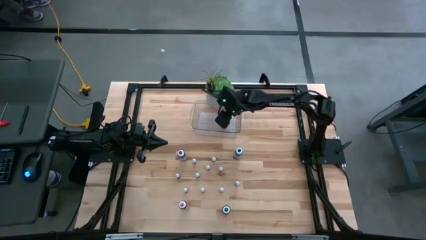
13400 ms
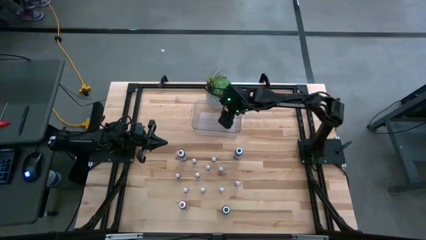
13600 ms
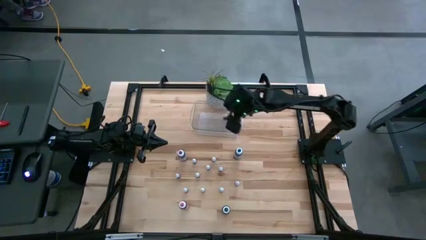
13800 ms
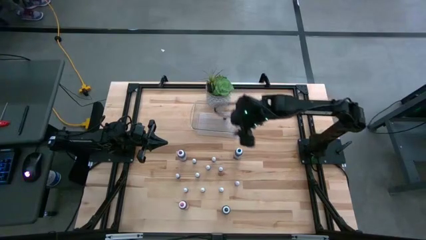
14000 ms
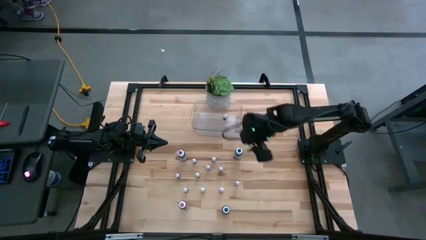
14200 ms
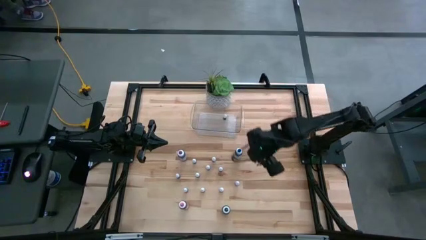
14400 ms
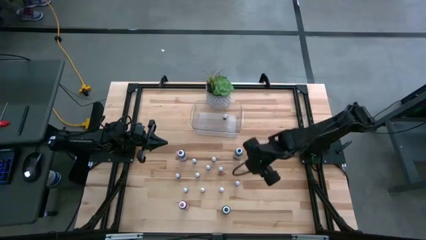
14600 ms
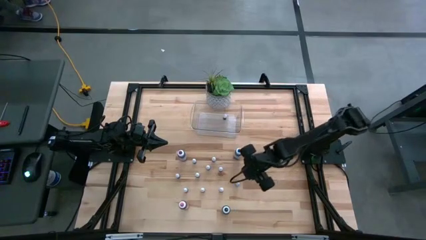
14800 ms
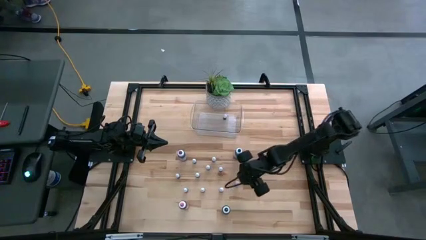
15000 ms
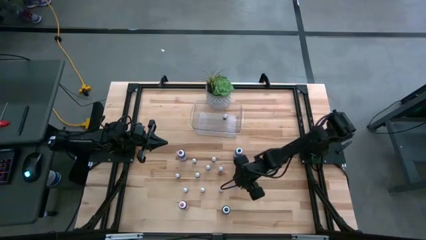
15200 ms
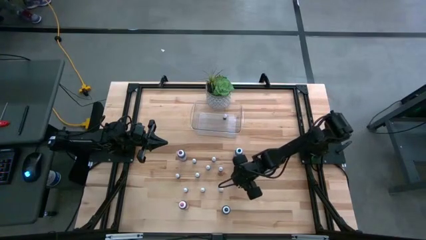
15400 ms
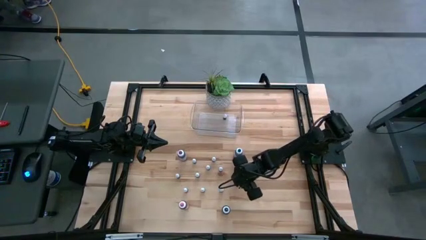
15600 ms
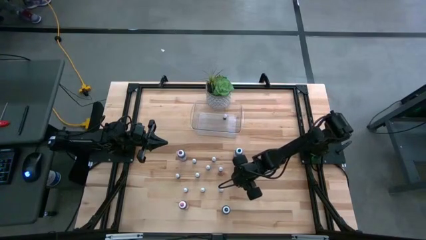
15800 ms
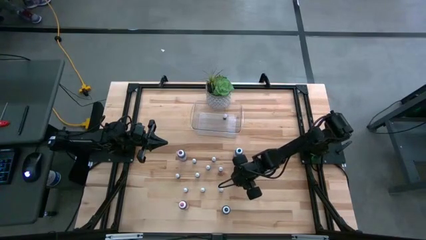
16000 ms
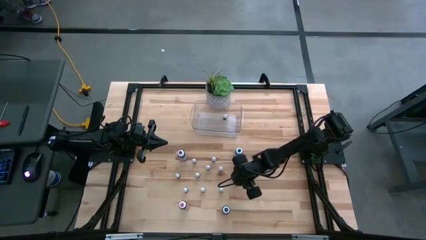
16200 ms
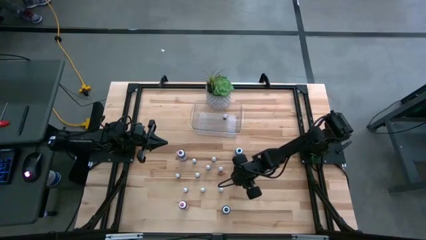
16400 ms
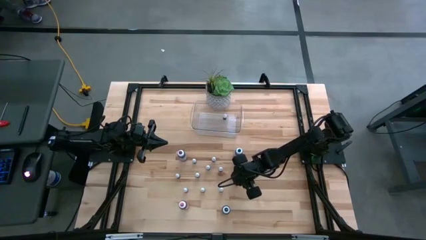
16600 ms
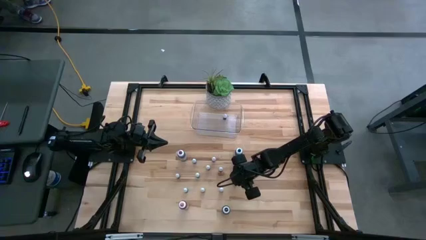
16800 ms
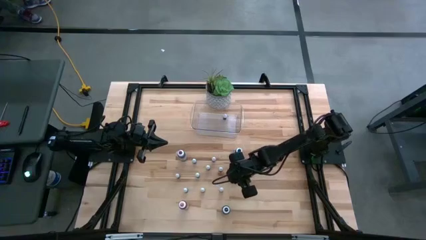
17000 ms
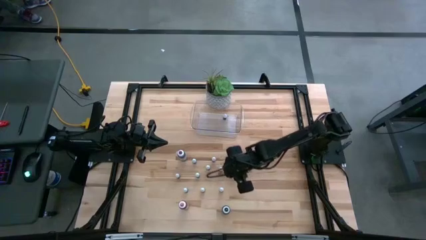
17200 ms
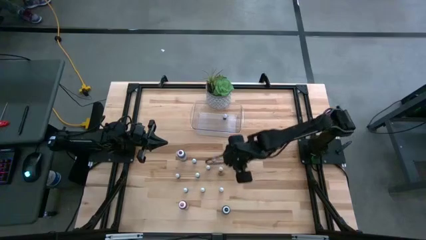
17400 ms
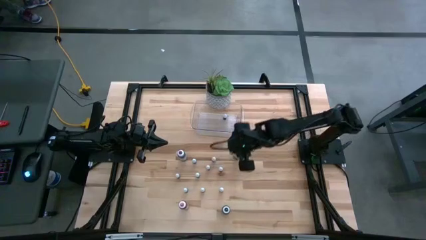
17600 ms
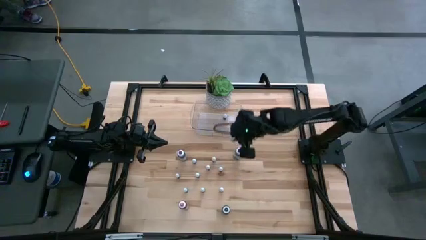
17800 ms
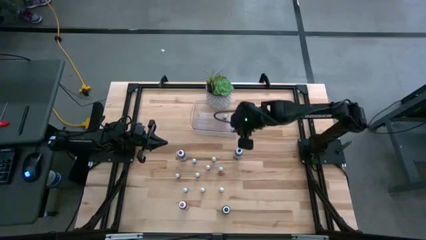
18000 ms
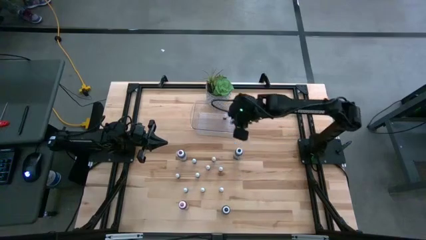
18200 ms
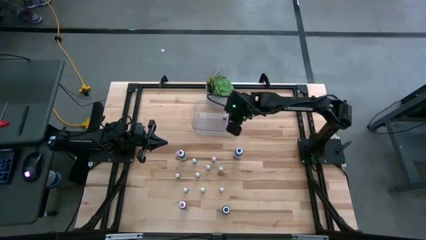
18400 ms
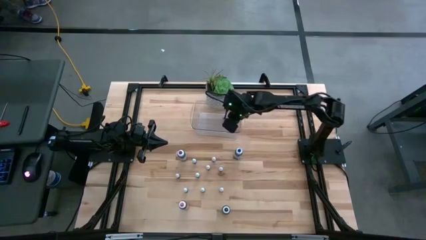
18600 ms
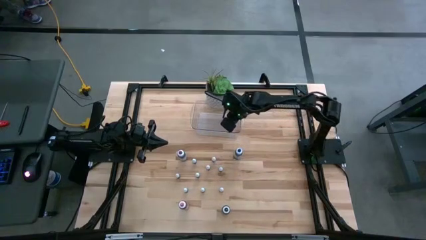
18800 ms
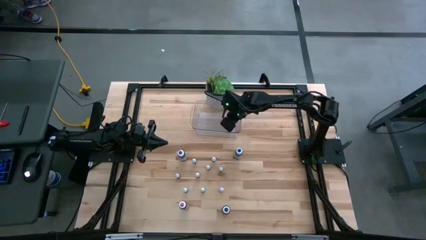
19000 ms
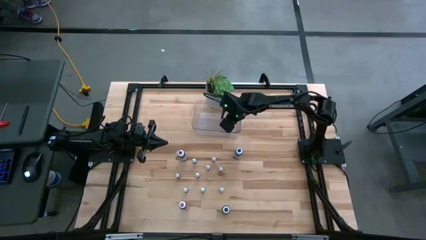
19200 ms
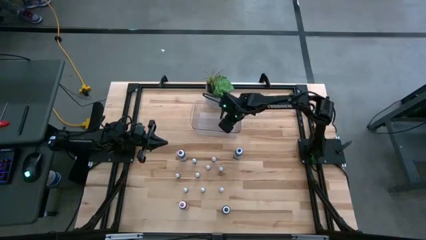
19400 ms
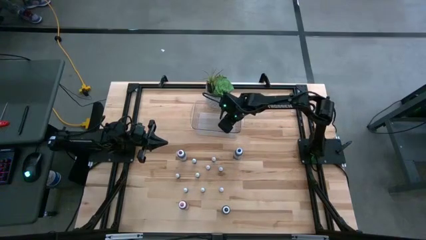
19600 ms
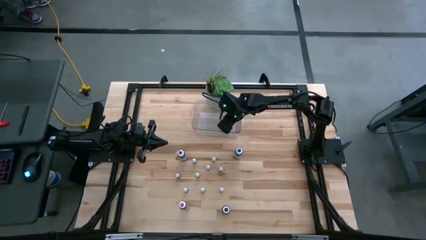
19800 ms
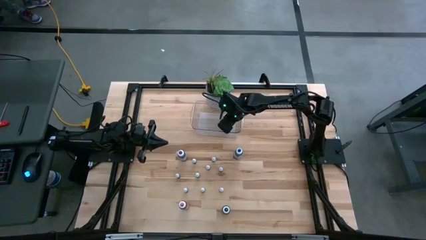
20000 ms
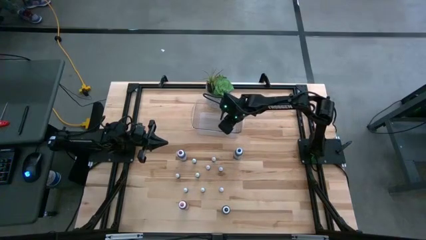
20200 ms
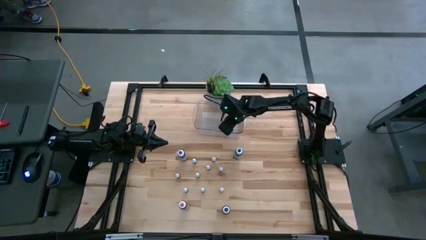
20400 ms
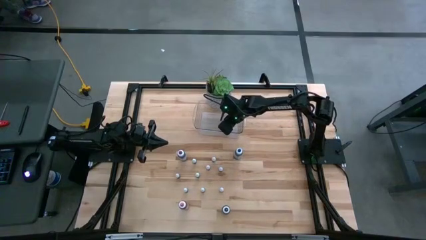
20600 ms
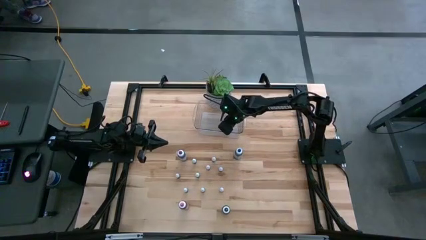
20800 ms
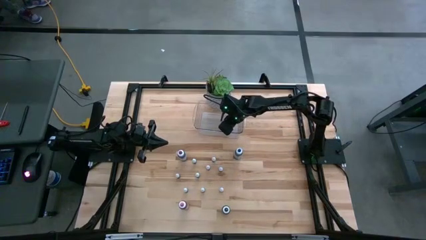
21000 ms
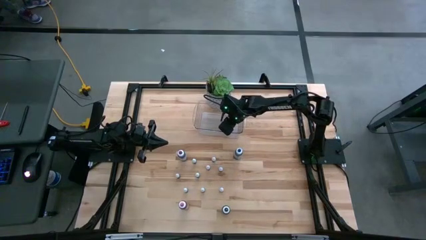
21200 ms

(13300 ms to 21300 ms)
Task: Pick & Place food coloring
Put the small orange food coloring bottle into the bin

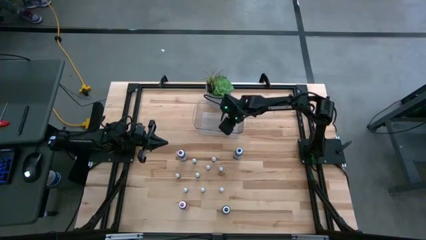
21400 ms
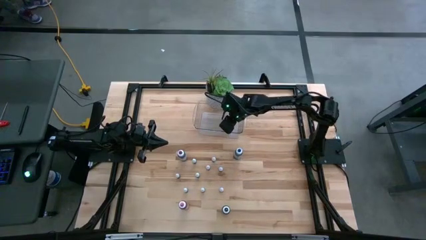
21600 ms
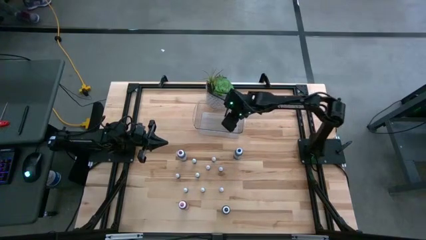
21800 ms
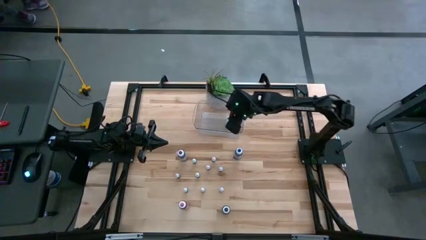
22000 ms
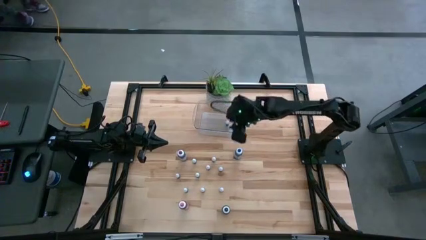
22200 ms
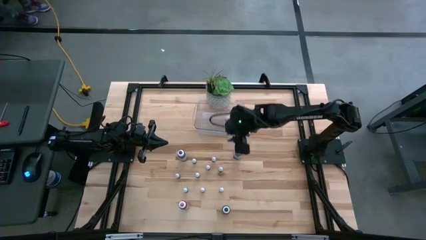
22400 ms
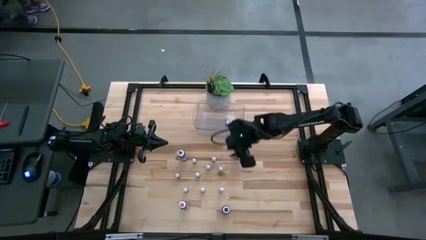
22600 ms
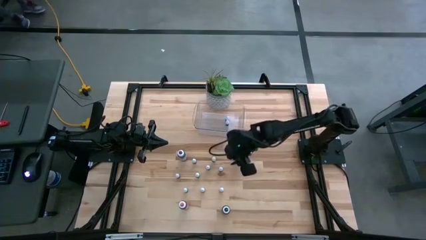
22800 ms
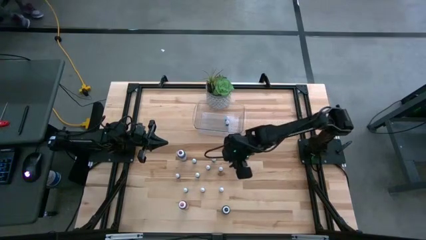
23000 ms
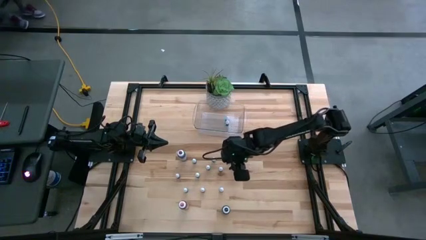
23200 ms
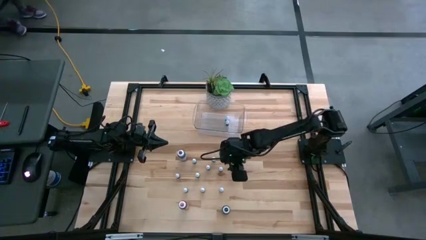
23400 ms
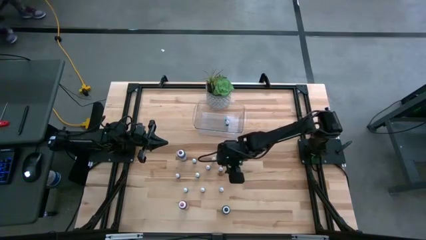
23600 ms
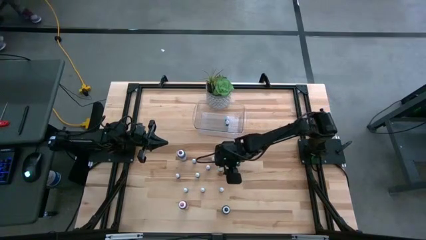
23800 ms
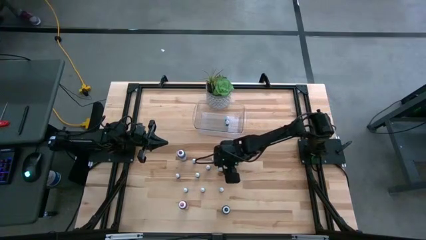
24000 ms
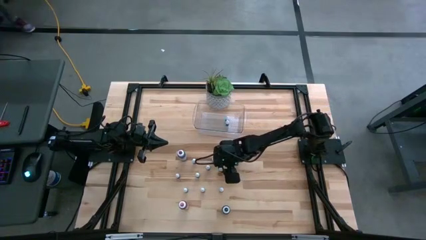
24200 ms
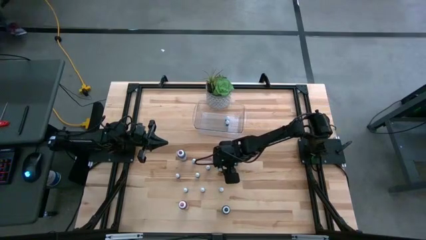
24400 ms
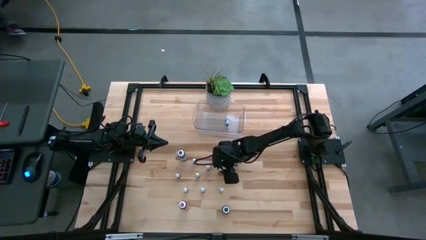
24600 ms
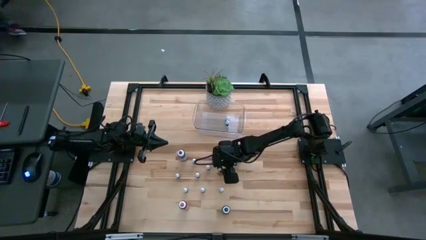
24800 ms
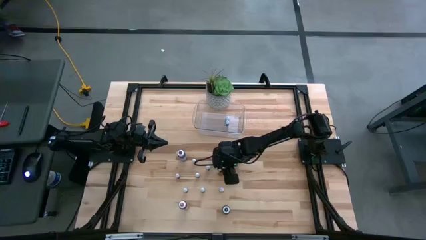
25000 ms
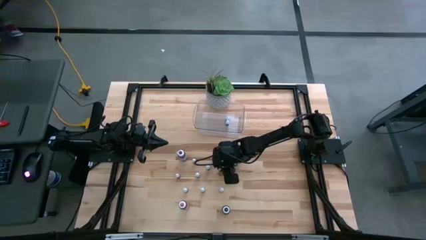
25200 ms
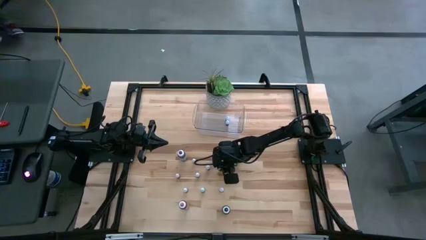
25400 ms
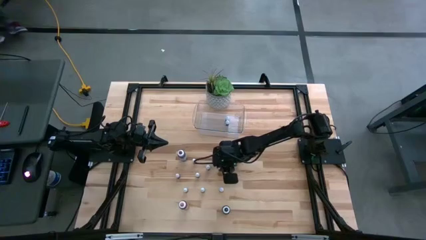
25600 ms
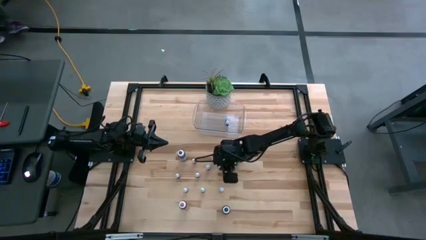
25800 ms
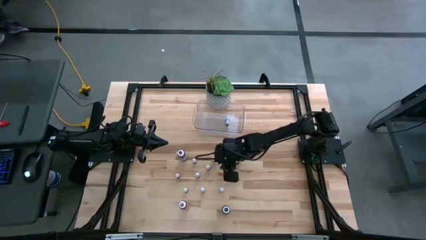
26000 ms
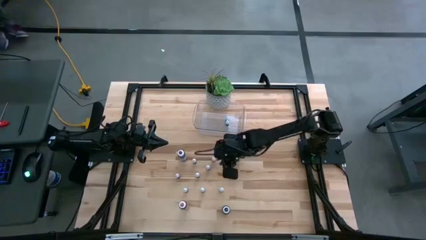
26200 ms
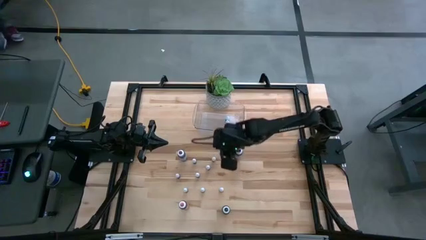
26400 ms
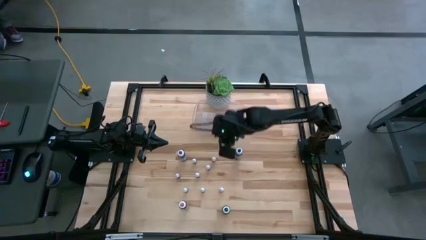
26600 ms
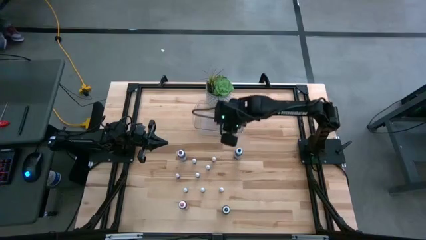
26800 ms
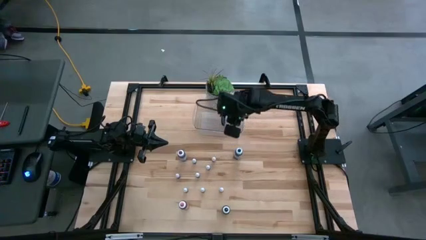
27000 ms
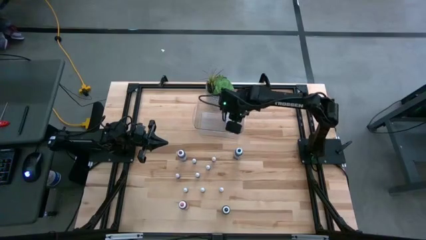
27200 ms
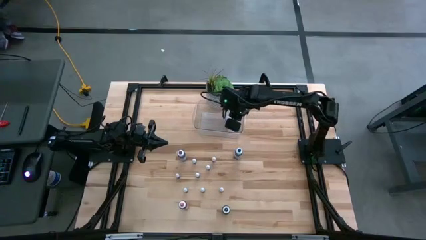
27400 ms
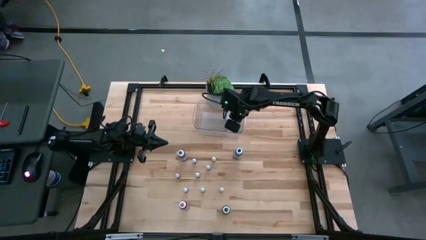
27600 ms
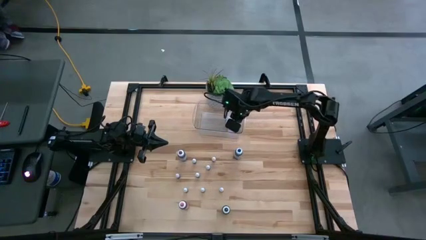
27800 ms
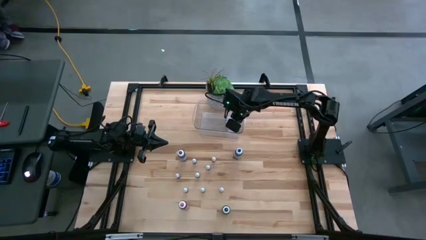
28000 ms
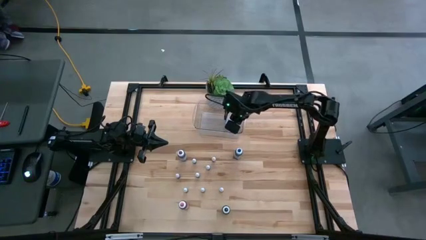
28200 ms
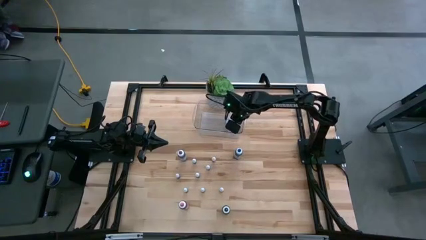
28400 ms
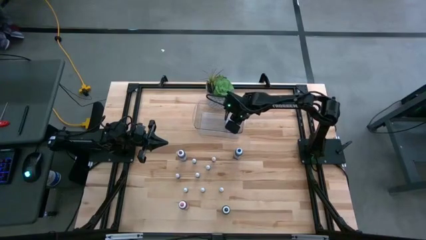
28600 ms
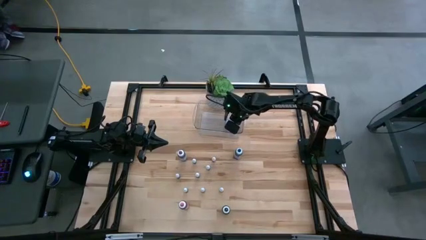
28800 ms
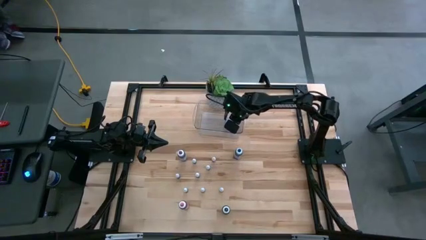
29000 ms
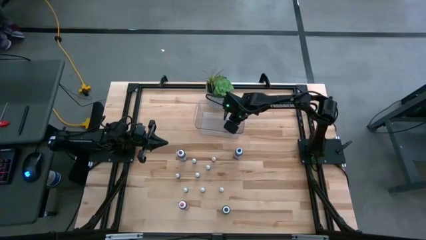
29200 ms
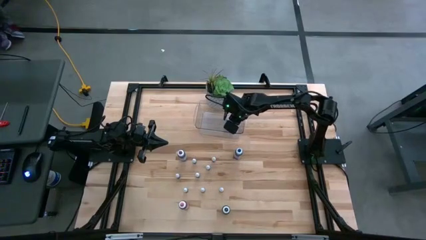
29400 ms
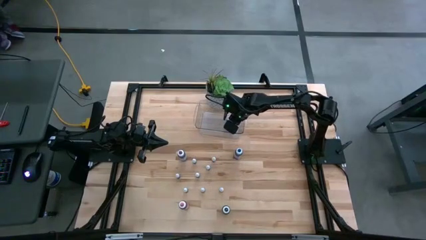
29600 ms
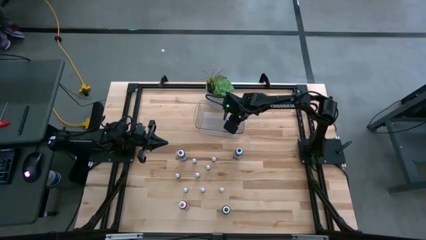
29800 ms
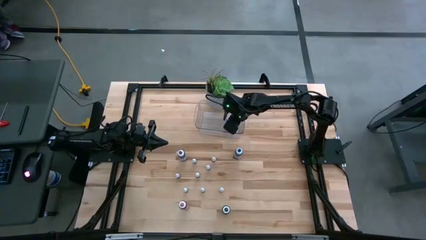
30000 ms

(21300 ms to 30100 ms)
Put the small black food coloring bottle into the bin
